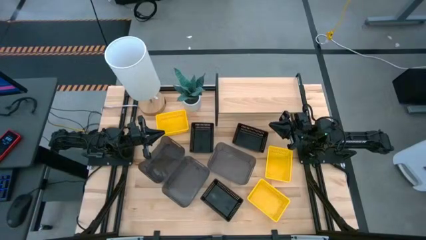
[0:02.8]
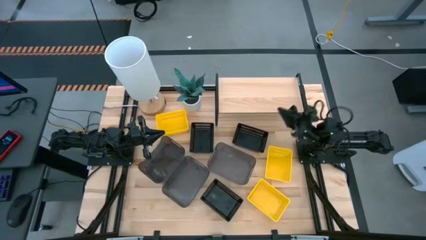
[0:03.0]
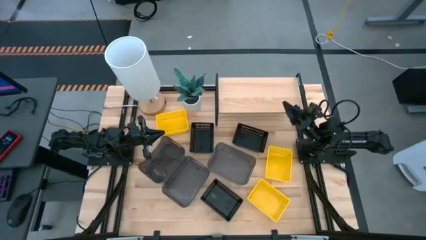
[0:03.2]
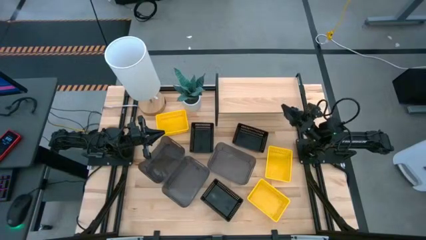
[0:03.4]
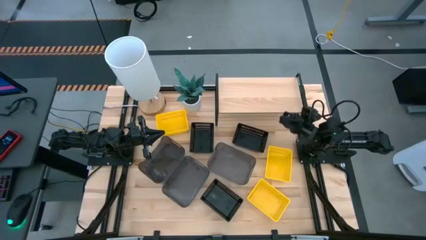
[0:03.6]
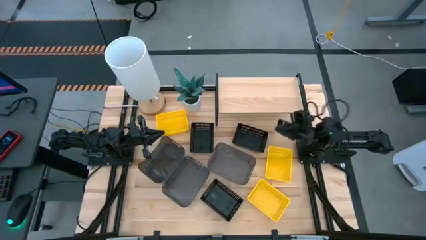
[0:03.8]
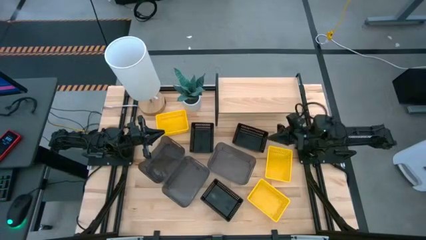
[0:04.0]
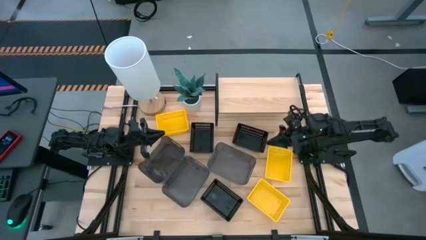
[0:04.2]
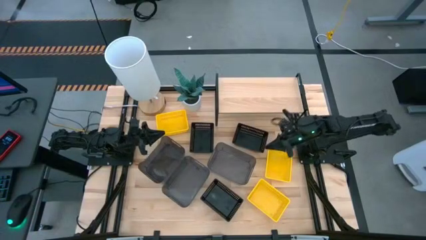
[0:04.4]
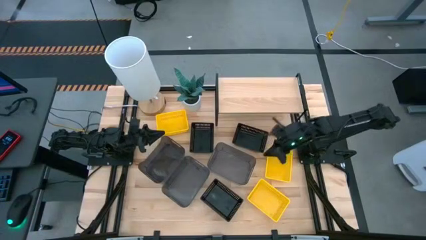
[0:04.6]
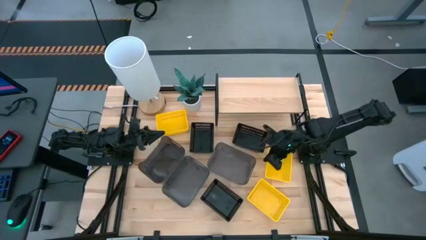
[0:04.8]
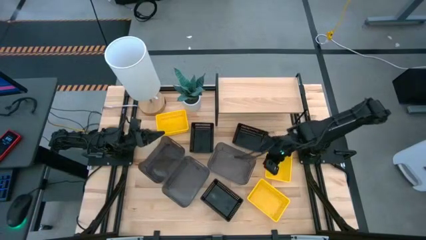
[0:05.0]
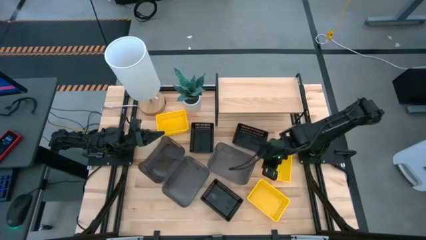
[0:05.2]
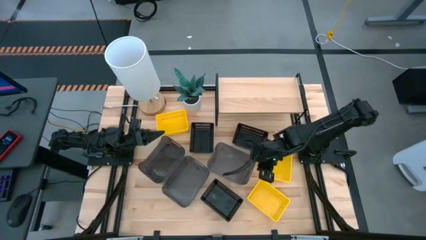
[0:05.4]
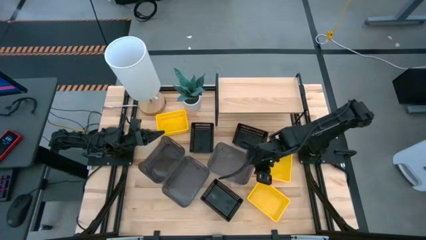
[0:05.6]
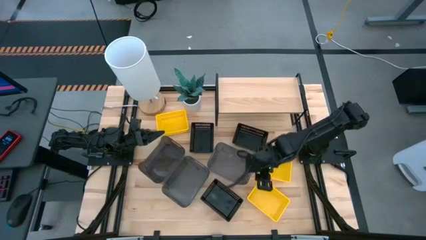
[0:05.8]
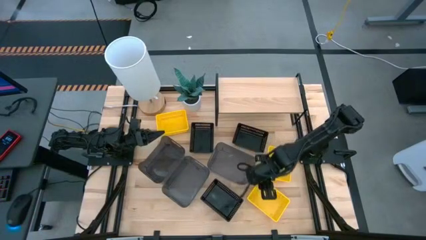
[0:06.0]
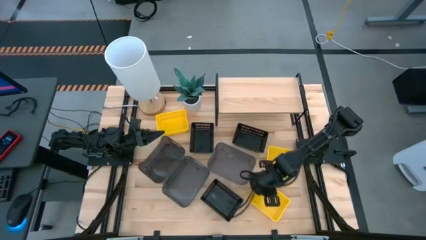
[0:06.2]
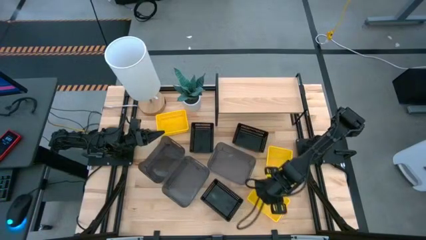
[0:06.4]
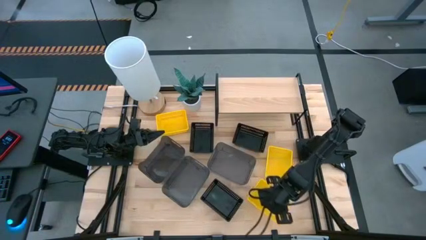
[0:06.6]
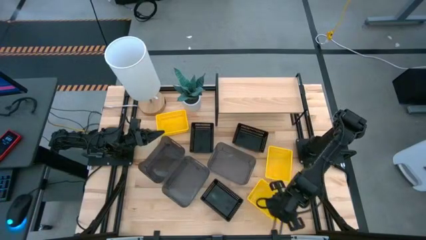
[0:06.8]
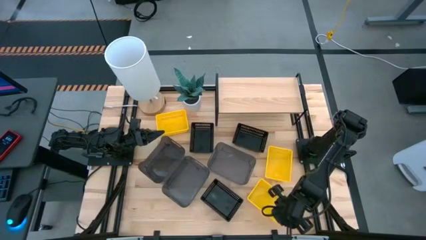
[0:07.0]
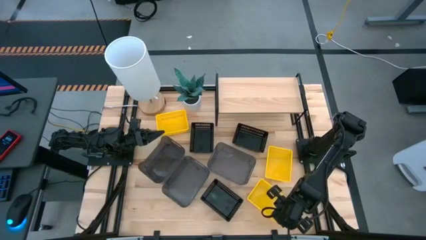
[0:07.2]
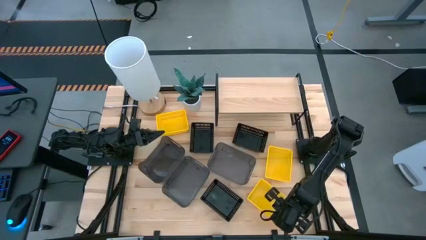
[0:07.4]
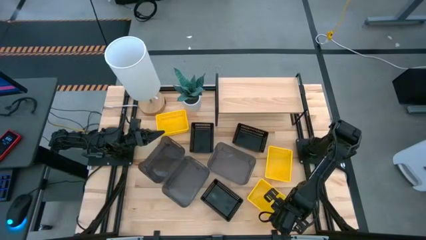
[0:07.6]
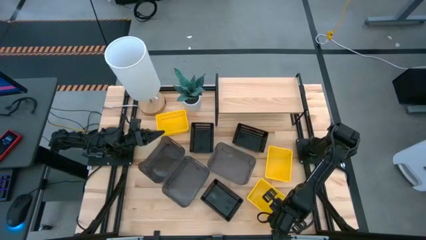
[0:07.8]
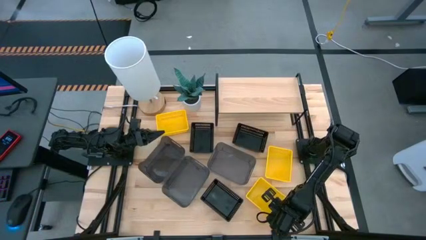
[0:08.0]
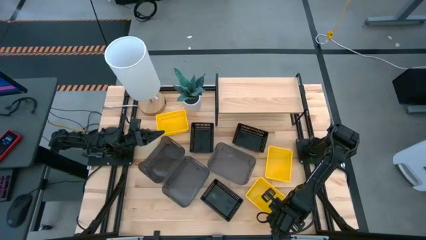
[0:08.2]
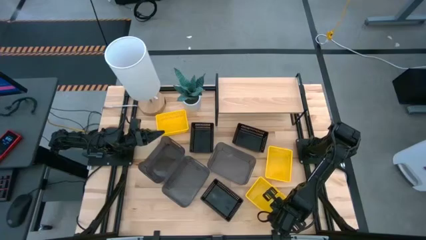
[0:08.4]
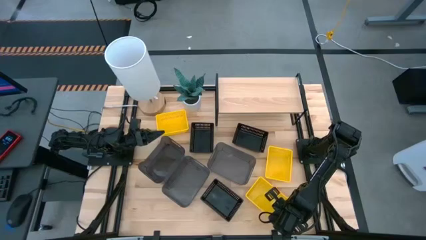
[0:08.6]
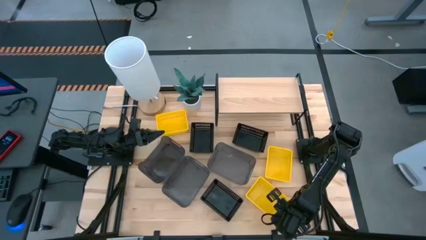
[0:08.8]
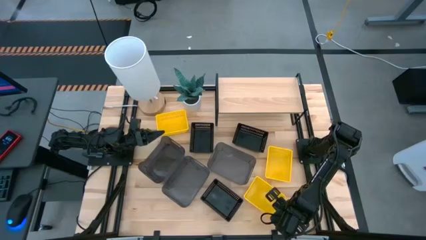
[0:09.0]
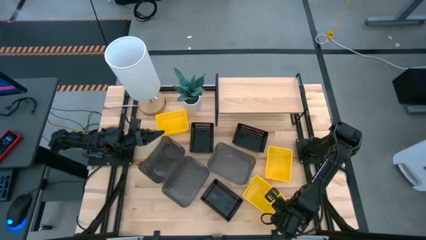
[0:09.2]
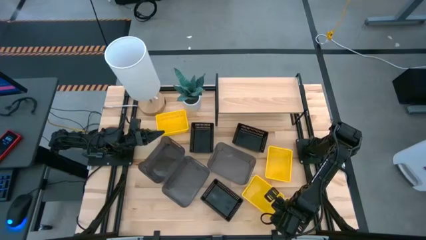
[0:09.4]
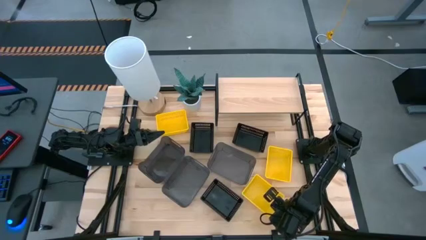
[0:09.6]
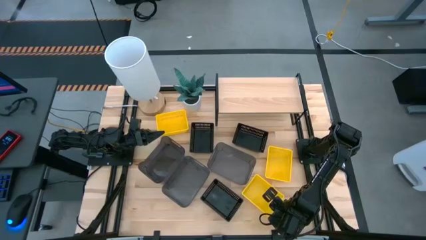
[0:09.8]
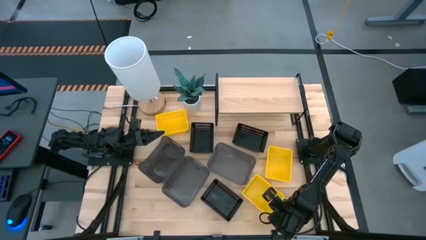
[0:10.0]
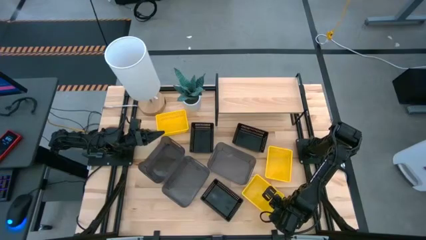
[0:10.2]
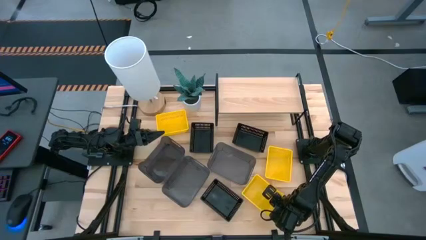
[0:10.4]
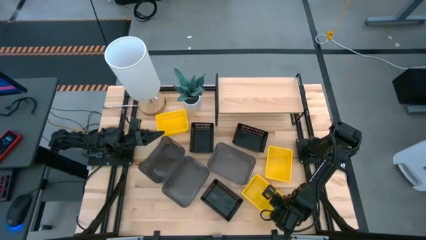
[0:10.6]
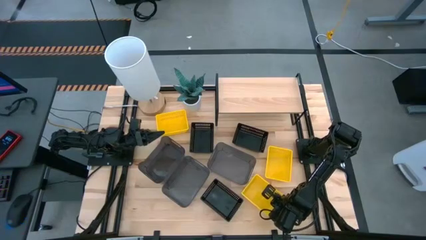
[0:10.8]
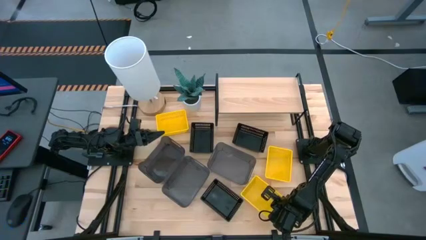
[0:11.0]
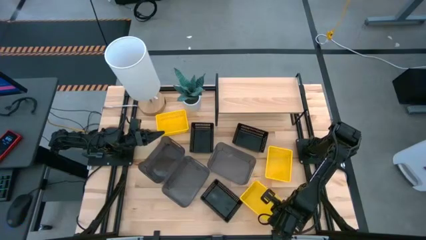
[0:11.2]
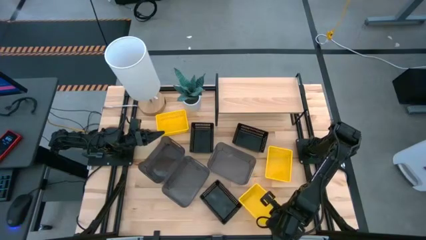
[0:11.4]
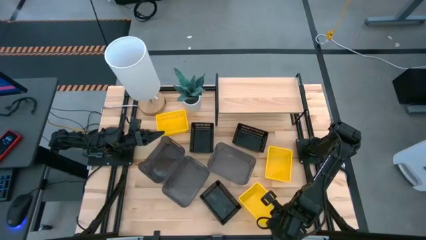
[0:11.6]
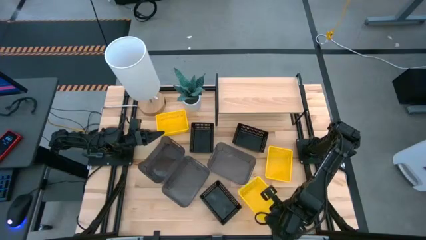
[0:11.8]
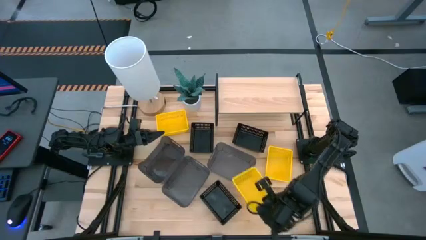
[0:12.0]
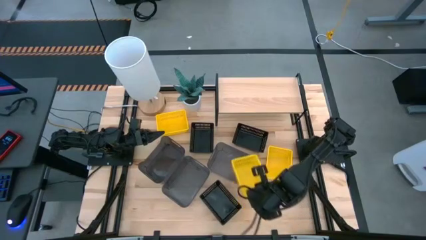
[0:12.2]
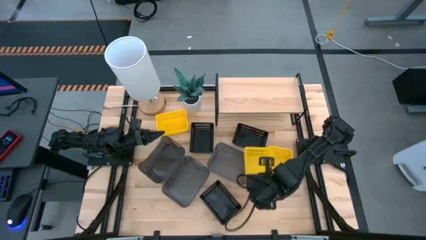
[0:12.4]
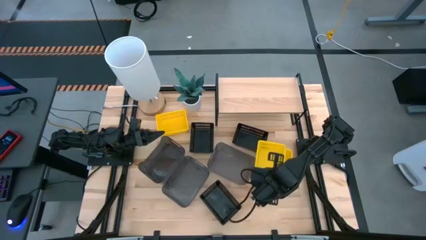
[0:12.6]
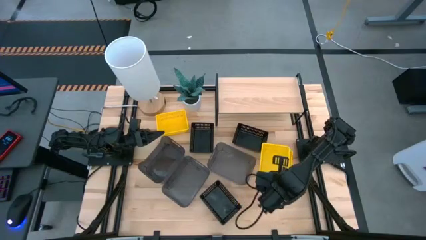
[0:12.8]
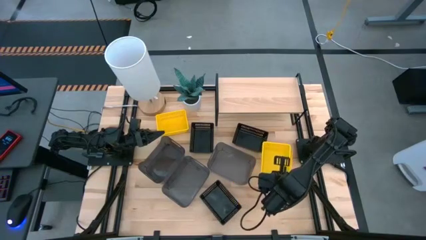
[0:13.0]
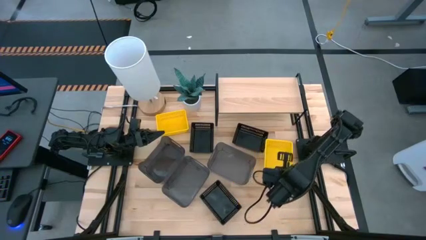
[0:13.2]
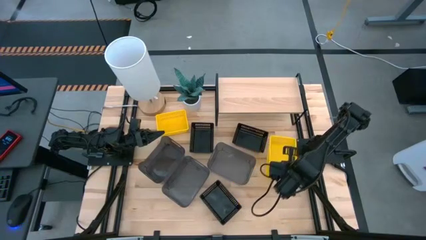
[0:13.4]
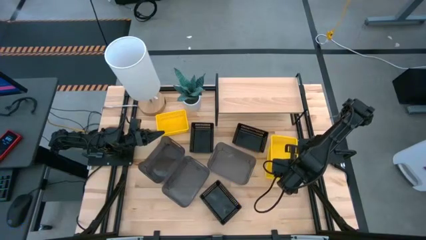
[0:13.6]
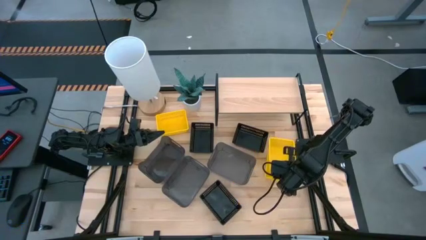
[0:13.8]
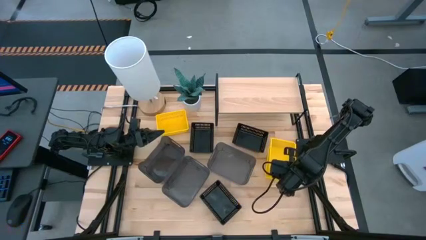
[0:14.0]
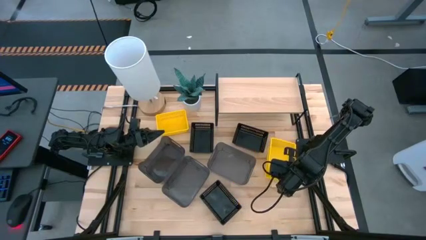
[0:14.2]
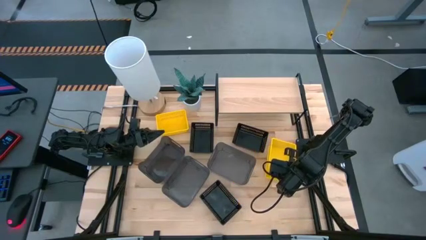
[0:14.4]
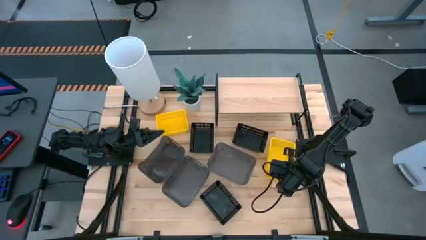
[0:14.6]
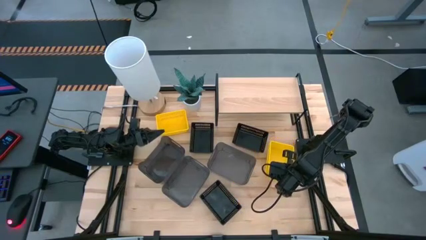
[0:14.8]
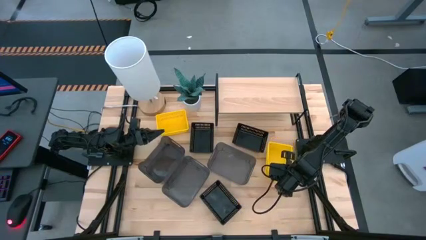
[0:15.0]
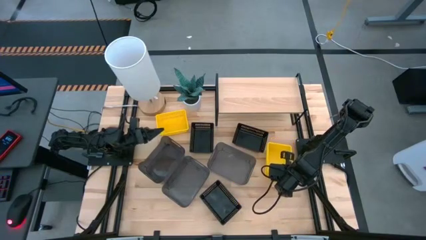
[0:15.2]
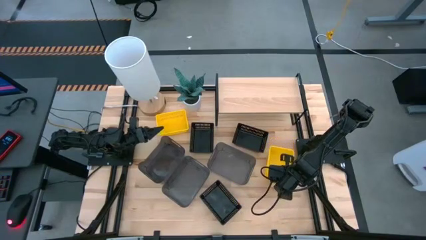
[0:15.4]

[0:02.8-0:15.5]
Task: Stack baskets on shelf by color
Stack the bottom yellow bin on top of the yellow bin
